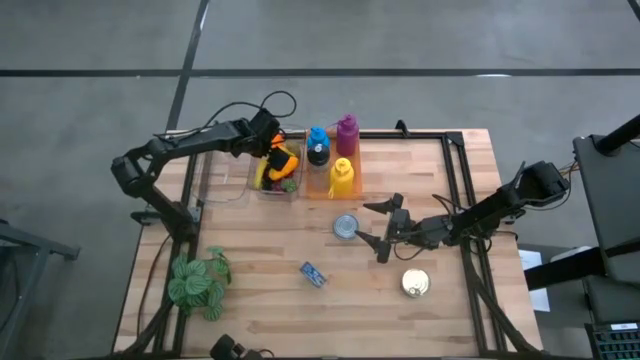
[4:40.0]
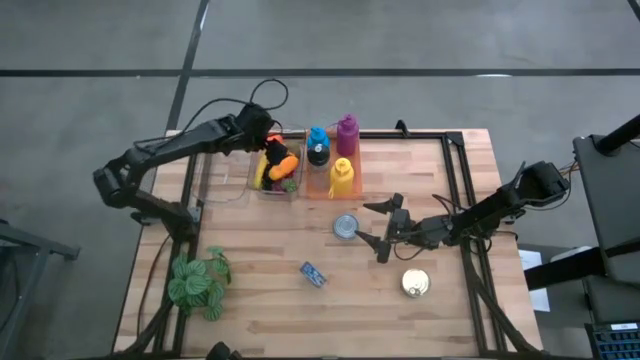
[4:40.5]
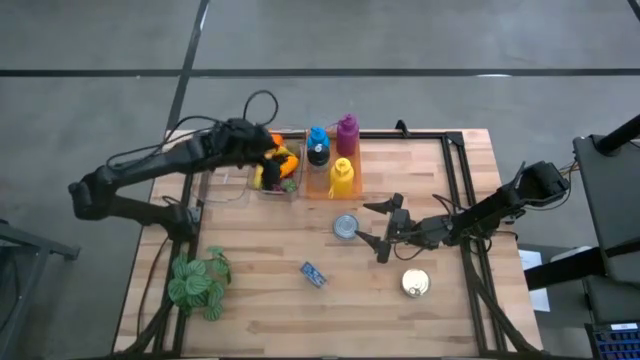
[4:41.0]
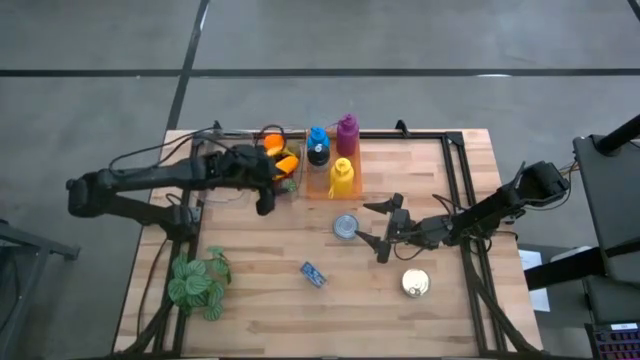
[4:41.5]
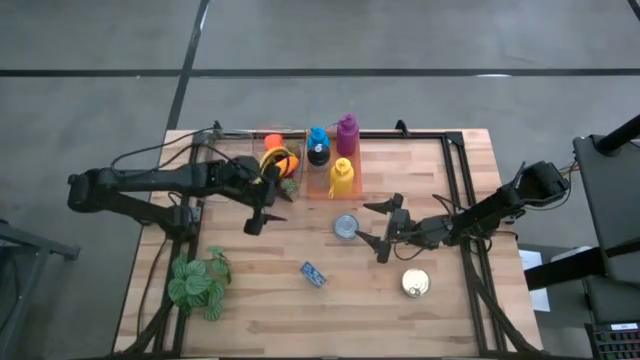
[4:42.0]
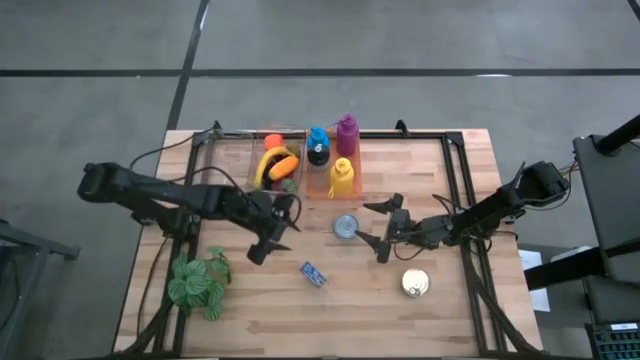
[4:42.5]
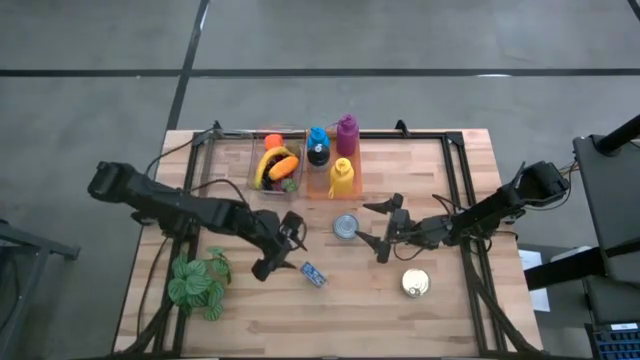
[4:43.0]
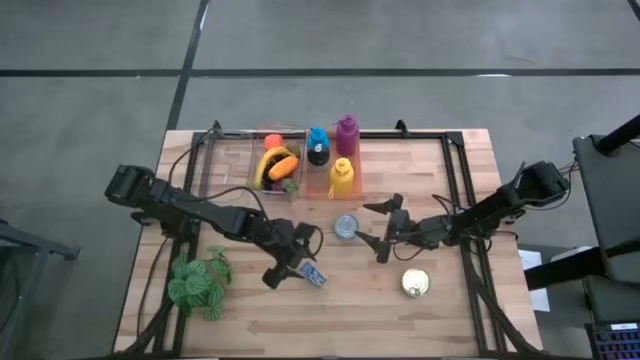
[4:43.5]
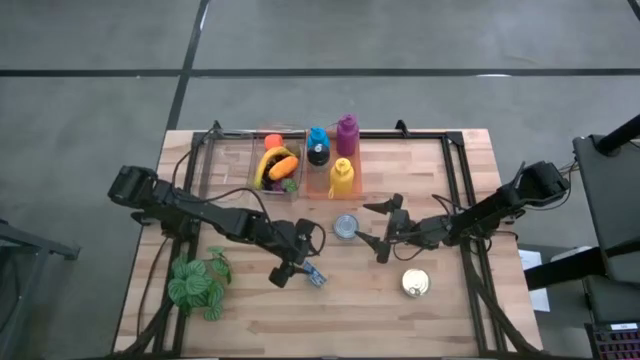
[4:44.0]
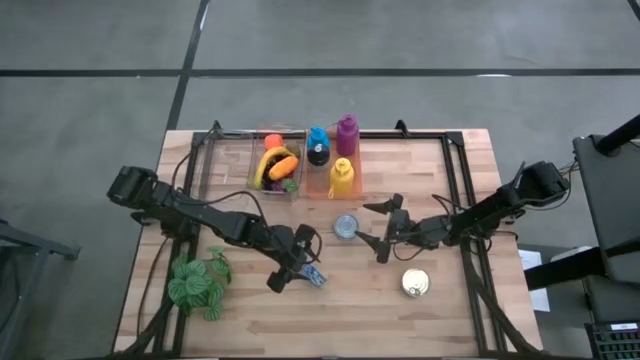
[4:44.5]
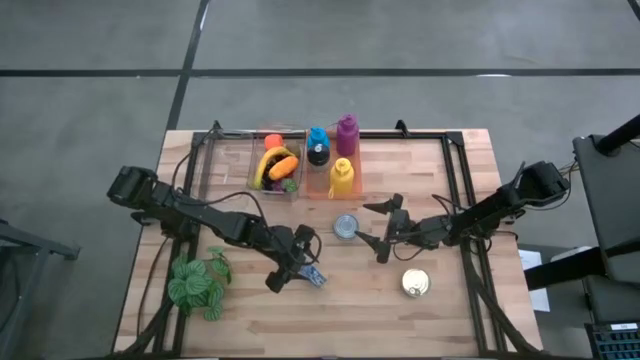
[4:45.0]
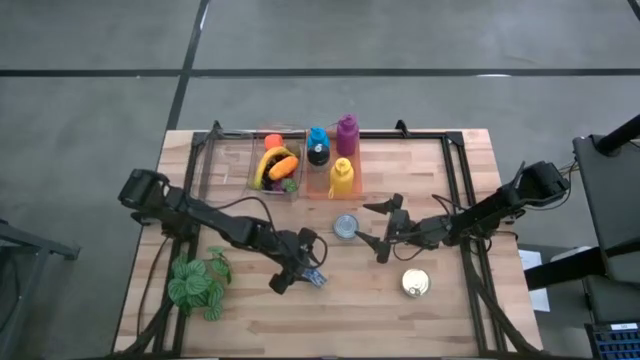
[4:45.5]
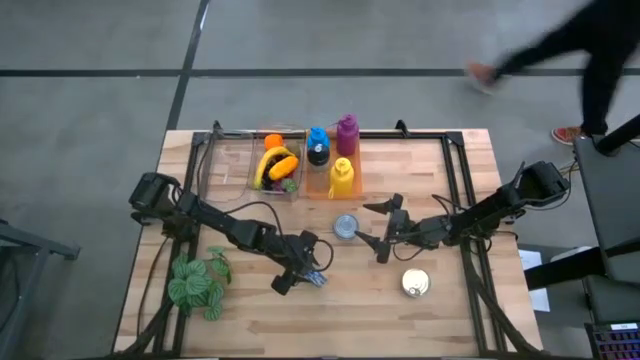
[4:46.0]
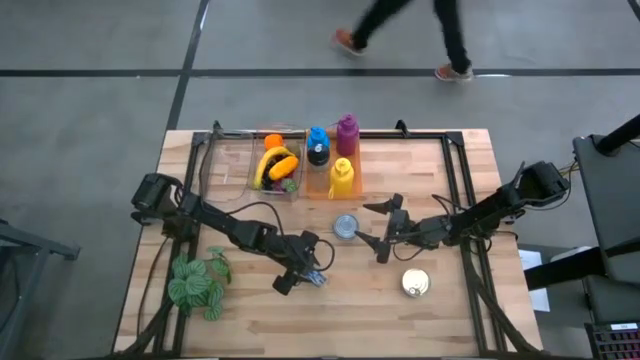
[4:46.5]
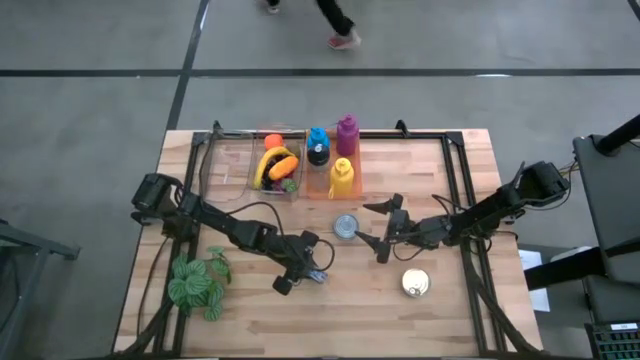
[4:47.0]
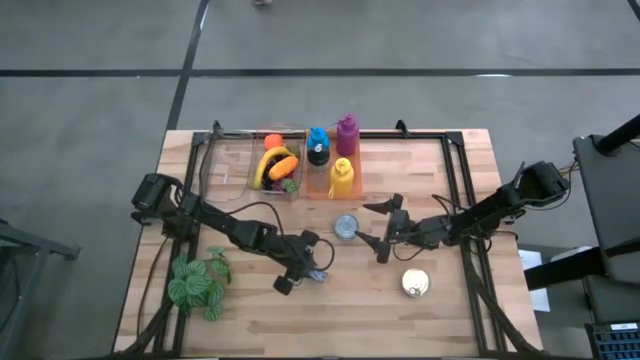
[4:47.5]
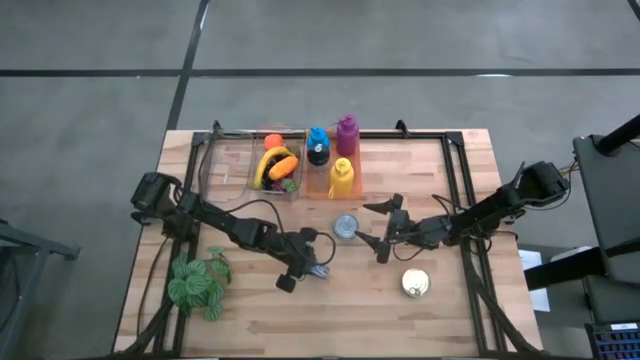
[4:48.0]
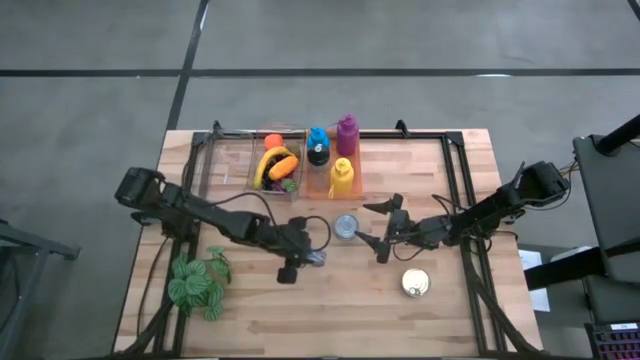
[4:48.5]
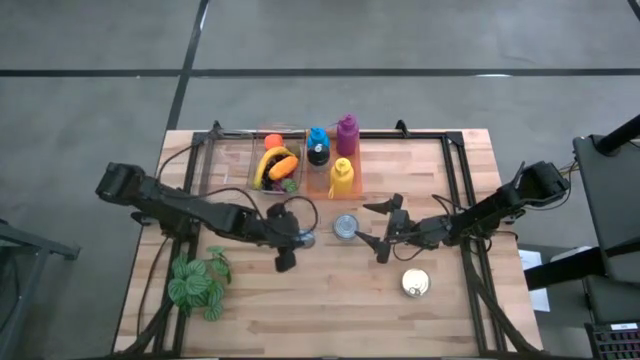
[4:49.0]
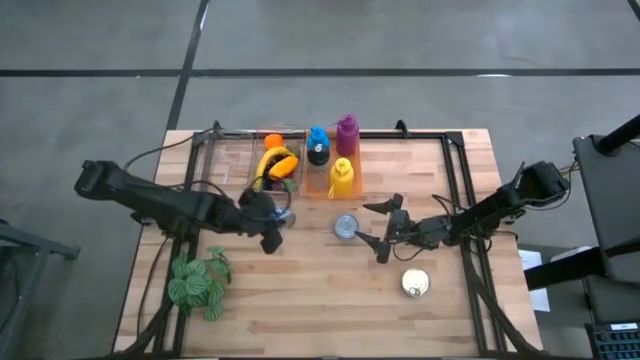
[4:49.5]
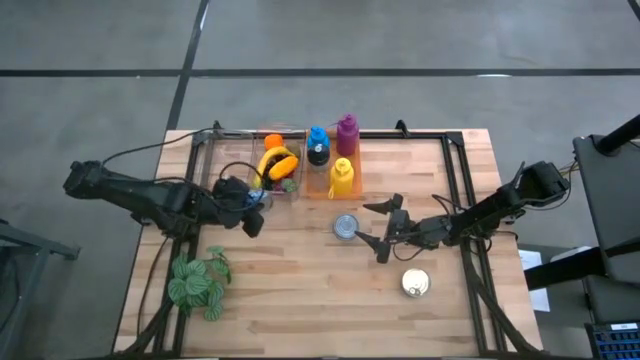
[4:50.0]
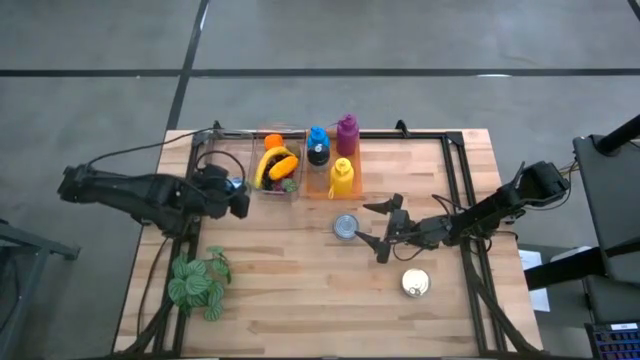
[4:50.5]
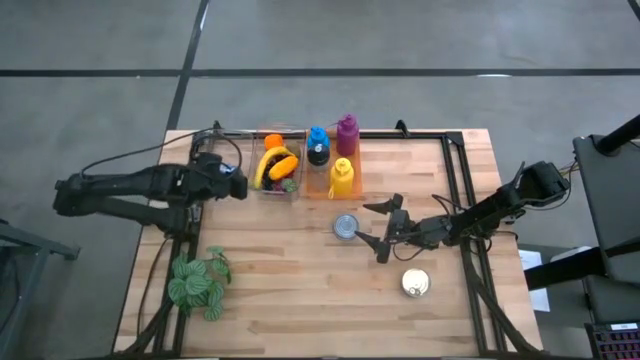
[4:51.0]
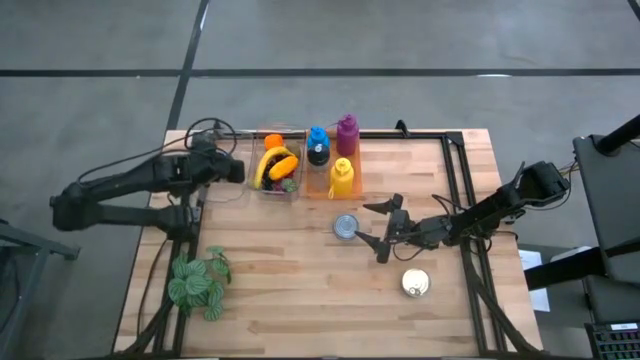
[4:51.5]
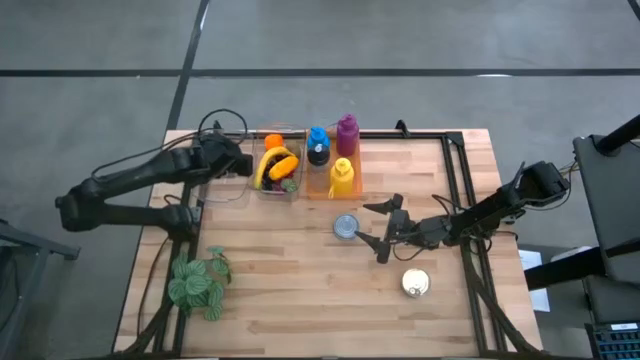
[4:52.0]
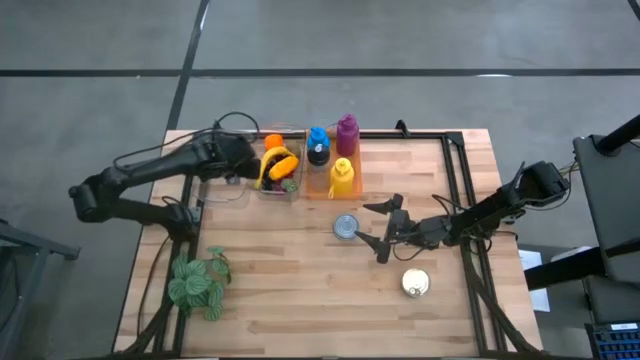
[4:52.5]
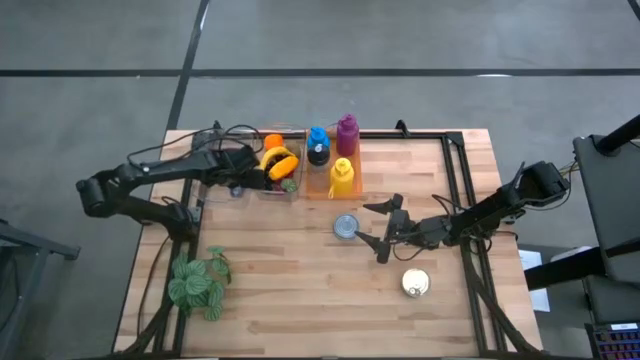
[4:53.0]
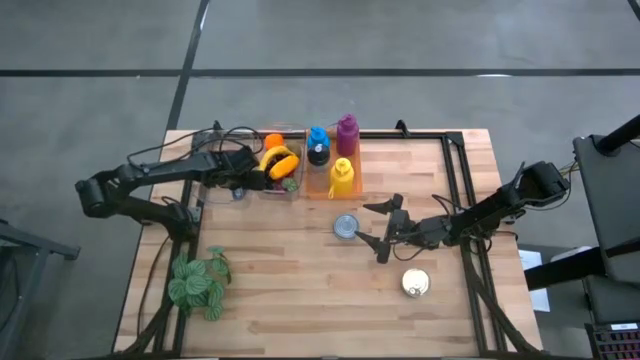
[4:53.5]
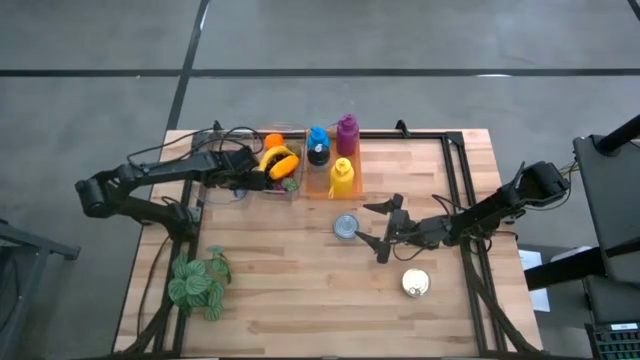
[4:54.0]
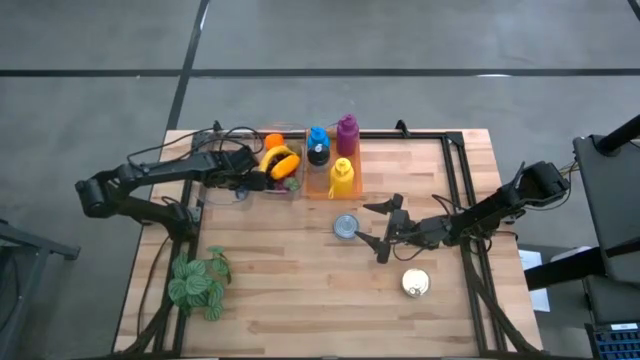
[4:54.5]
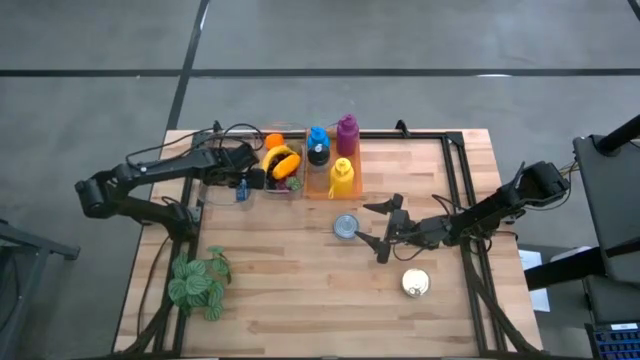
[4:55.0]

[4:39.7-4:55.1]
Task: Pick & Place Food Item
Put the blue tuna can into the left transparent bin
